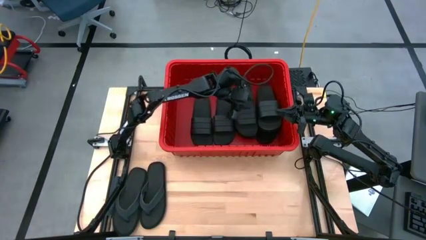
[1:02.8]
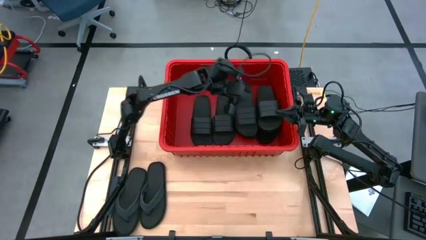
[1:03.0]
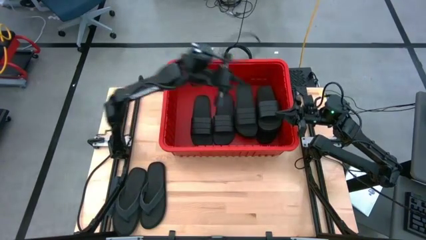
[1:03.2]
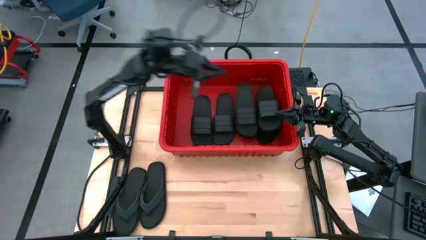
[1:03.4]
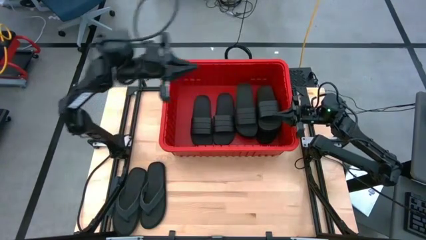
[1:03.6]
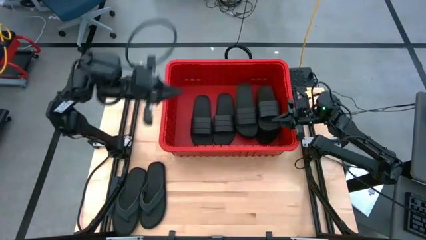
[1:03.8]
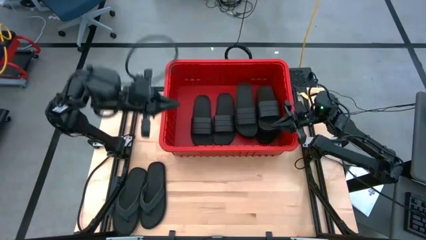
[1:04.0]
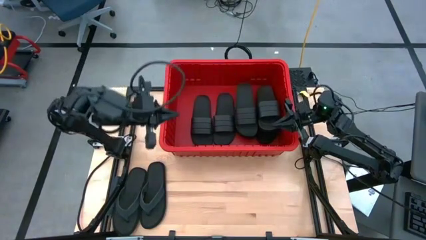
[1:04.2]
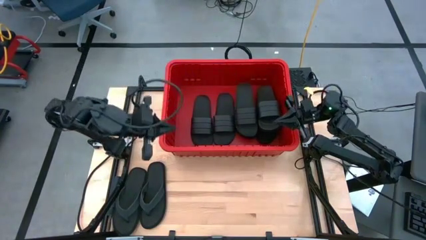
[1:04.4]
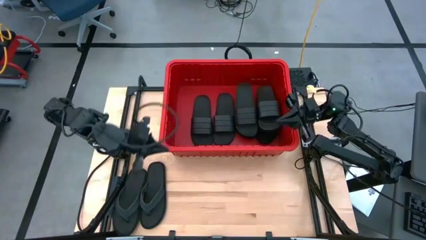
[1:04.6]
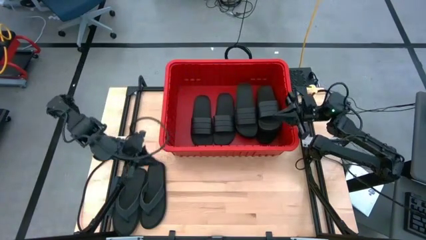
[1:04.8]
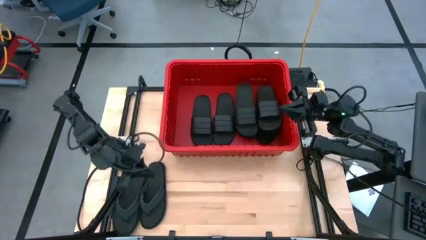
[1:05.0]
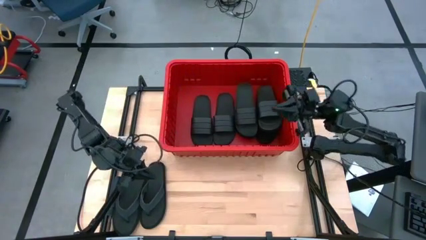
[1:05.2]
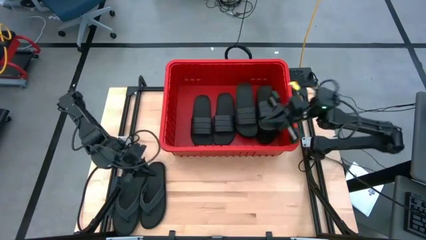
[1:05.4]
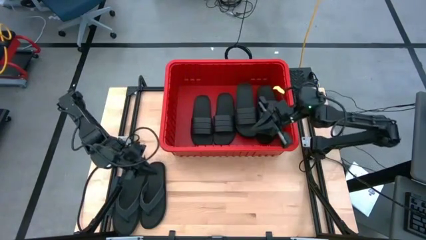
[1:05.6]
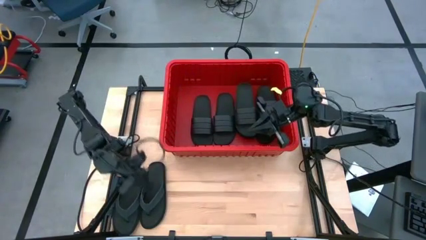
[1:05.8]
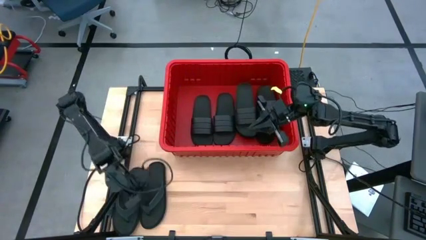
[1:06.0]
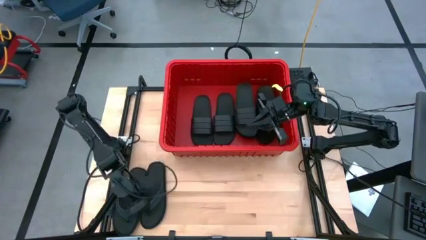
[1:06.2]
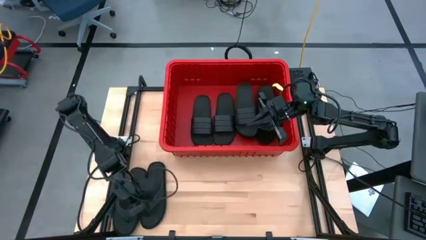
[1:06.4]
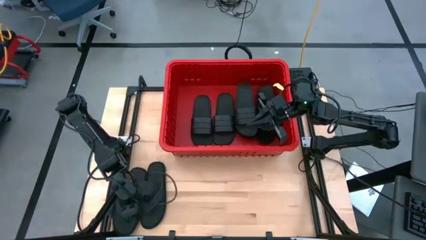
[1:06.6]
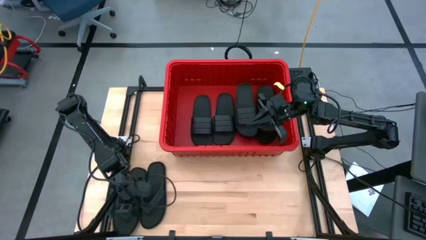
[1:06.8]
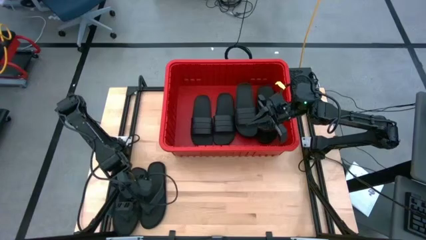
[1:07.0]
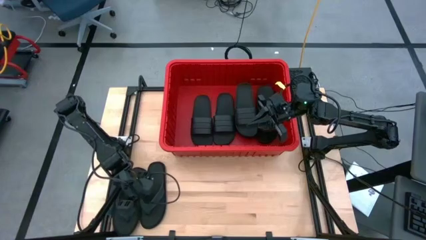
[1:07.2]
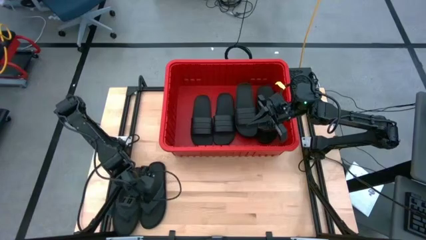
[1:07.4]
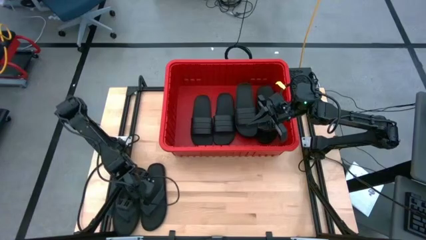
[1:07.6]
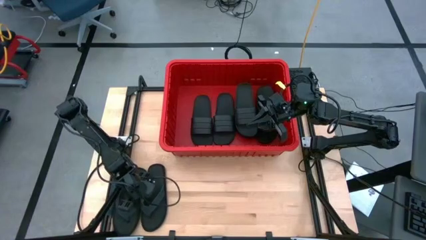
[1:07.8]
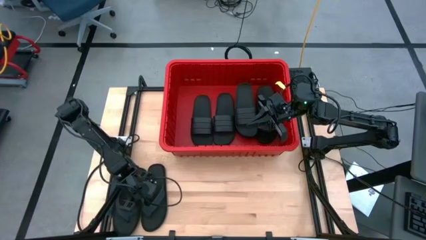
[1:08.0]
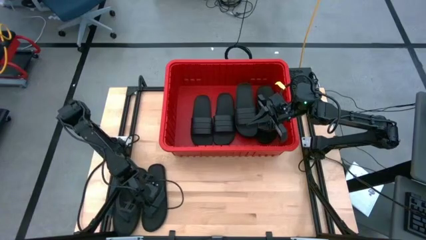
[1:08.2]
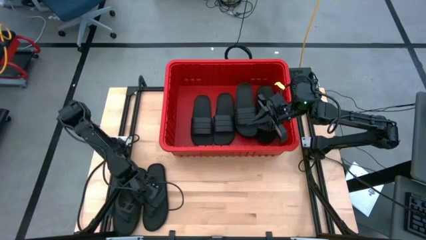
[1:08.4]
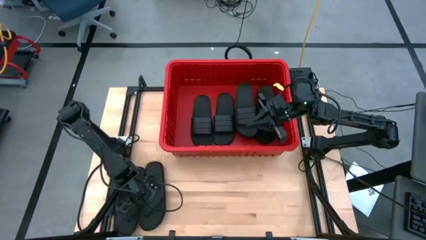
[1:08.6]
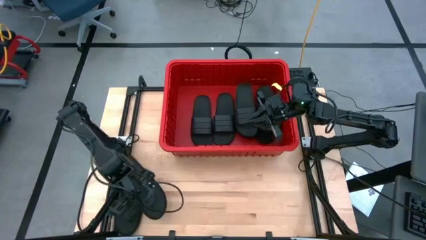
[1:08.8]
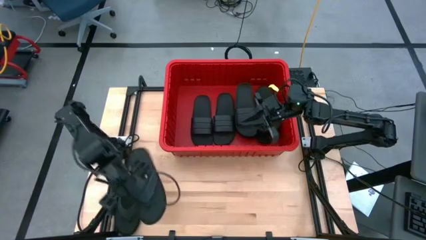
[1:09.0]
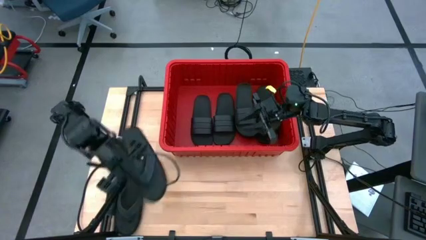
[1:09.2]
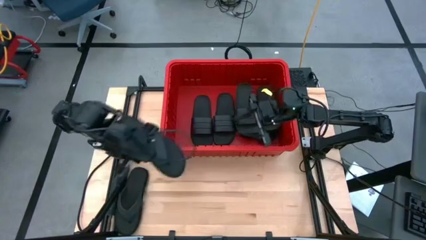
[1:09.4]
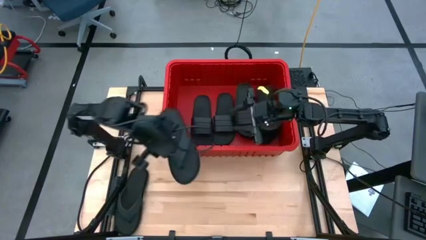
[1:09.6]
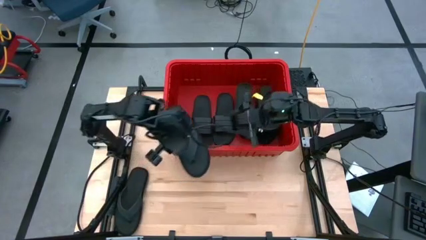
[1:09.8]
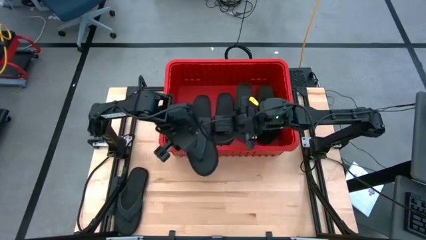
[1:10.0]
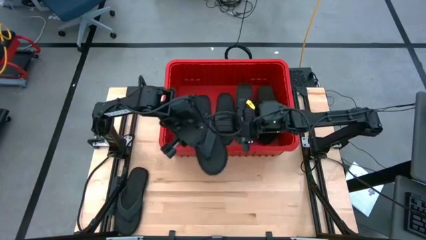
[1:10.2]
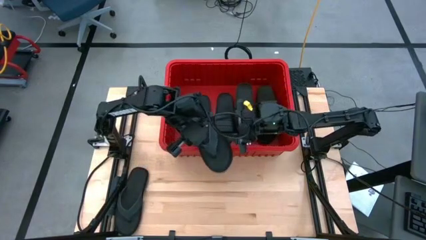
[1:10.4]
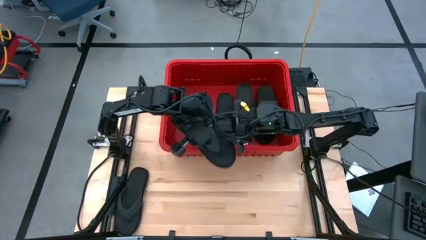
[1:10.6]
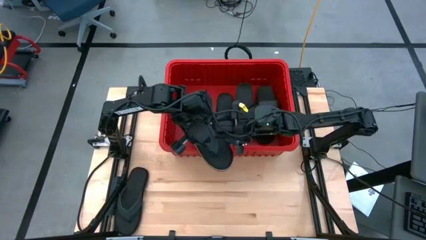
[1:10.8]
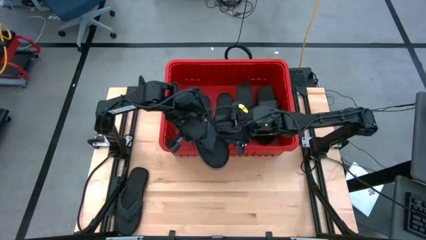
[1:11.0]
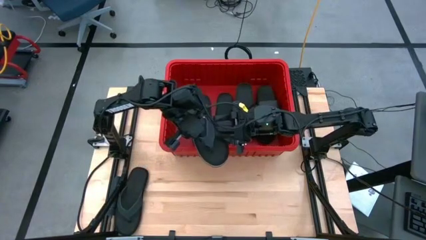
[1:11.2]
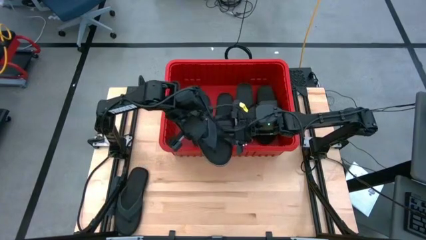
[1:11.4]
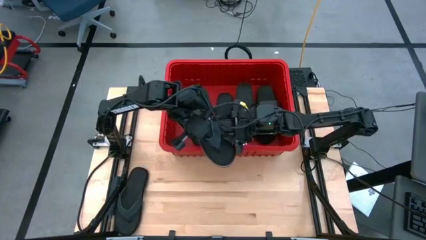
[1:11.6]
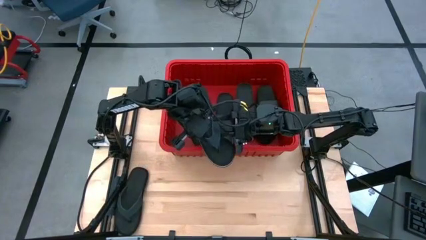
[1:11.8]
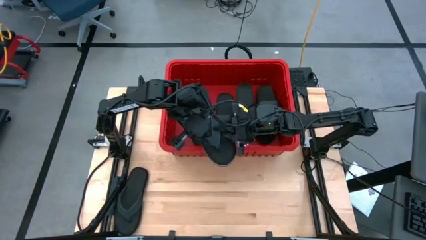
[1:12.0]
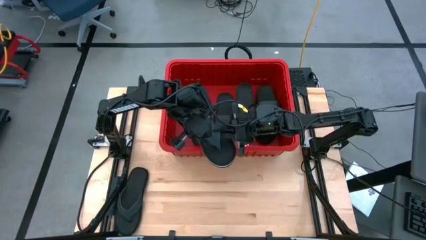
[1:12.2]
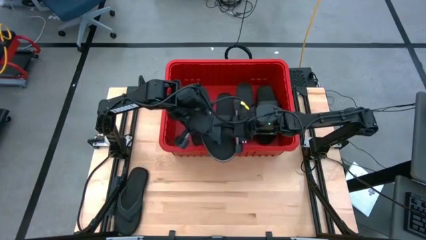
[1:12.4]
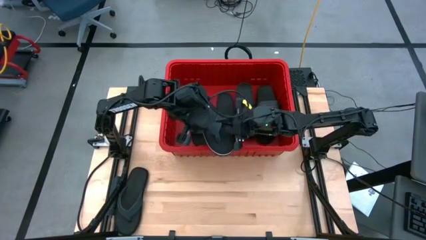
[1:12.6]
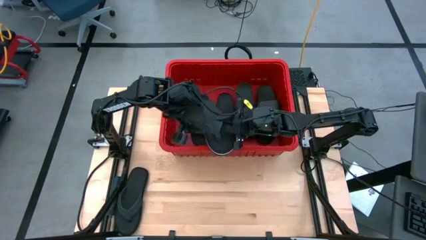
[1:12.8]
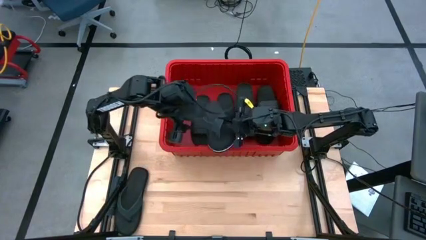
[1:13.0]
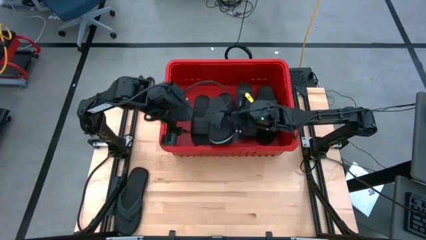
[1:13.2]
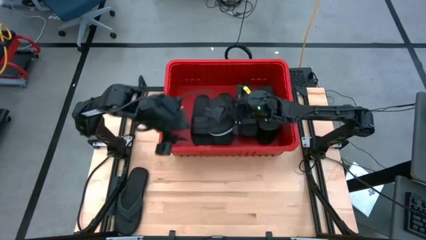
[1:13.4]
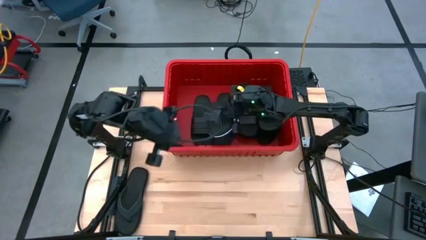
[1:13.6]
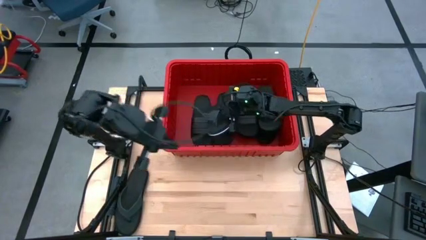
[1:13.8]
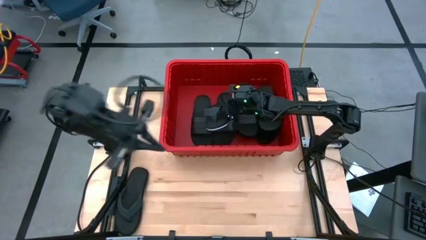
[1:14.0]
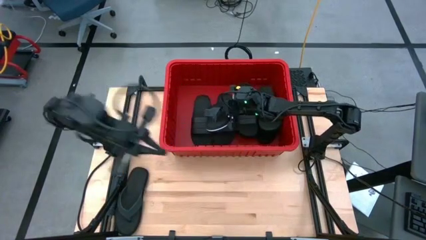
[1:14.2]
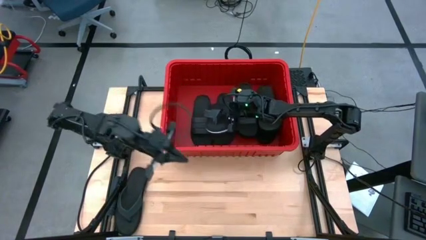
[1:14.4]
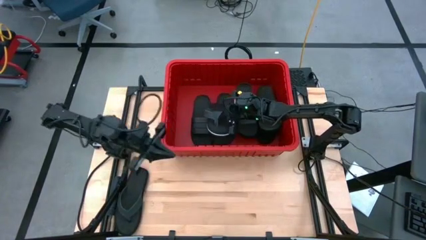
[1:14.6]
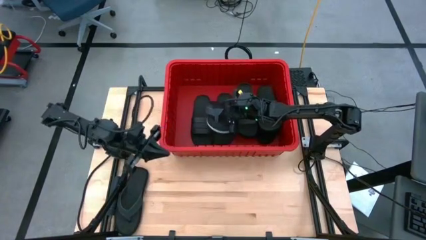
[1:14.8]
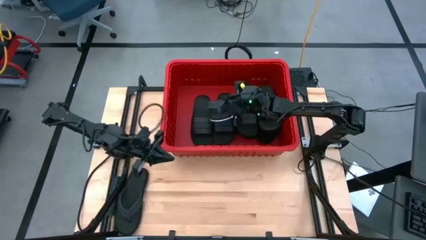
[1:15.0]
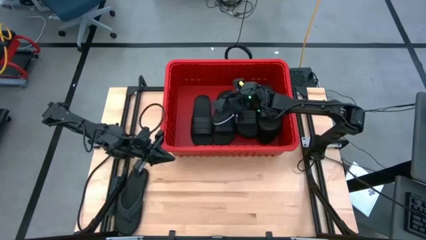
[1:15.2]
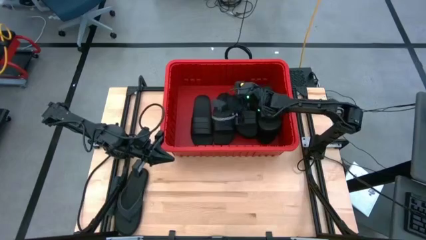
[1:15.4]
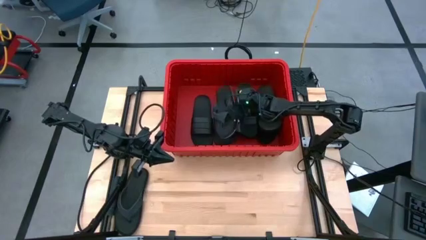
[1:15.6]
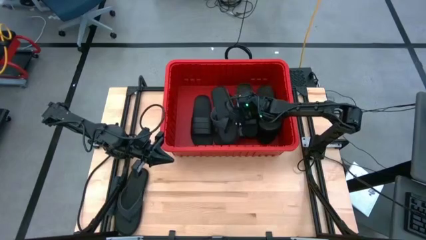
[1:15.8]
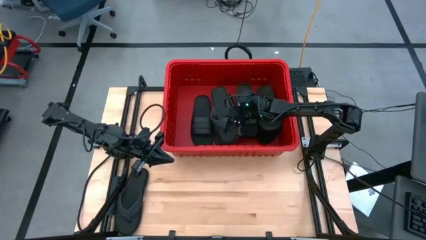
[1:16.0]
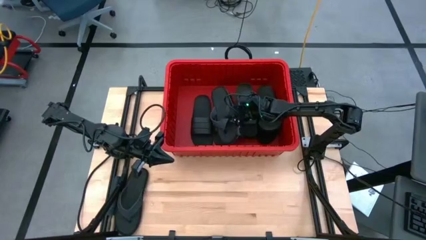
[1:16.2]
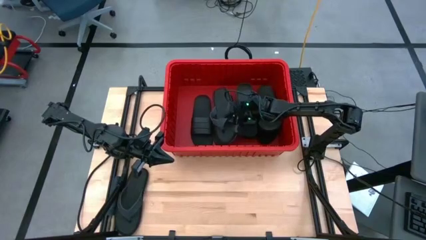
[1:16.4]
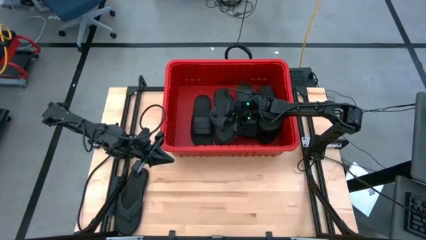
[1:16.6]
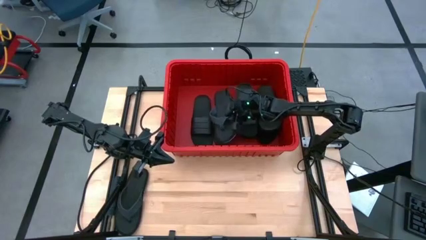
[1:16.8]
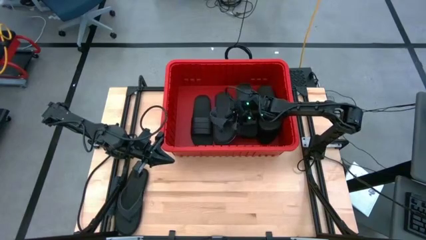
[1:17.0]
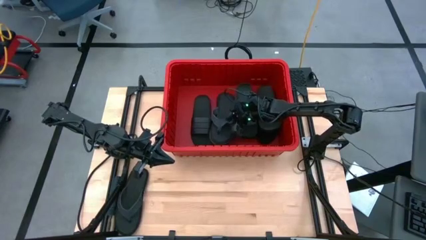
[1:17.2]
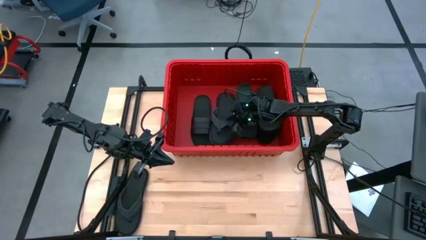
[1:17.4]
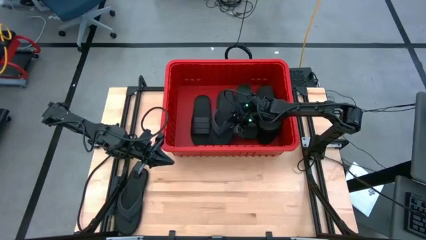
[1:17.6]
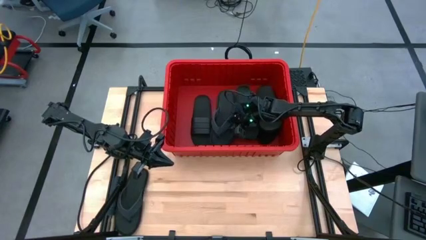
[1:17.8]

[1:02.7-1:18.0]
Task: Pick and place slides into bin
Put the black slipper into the red container

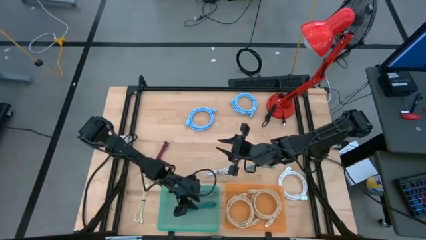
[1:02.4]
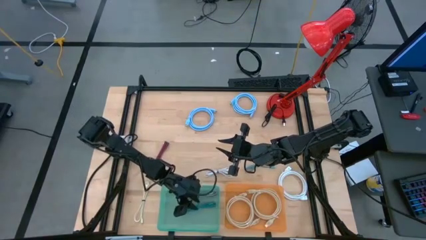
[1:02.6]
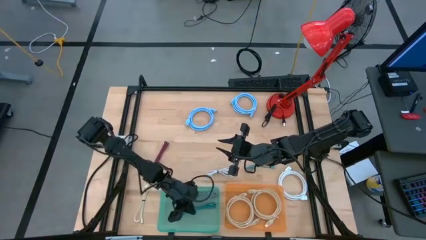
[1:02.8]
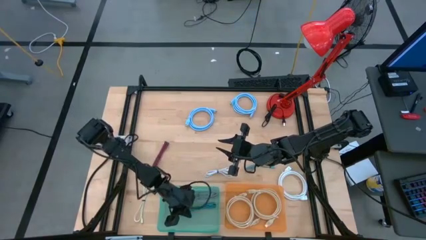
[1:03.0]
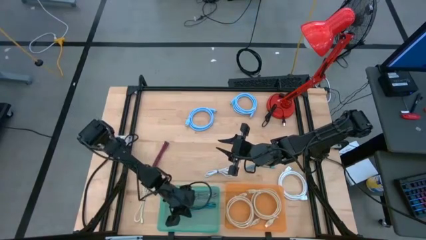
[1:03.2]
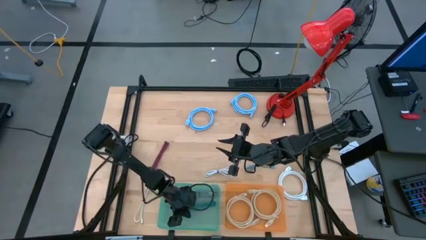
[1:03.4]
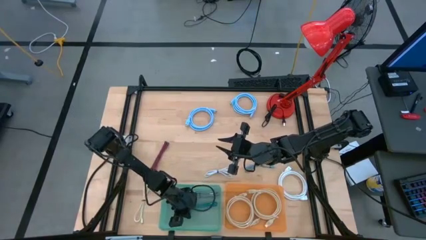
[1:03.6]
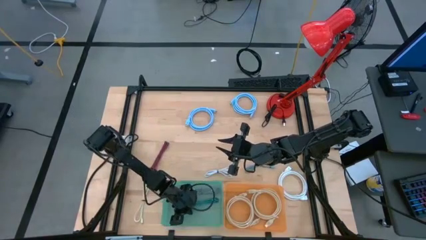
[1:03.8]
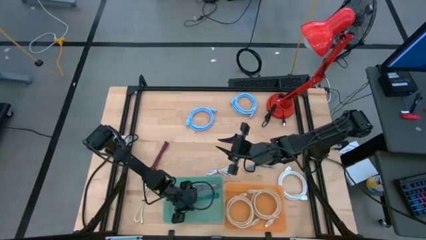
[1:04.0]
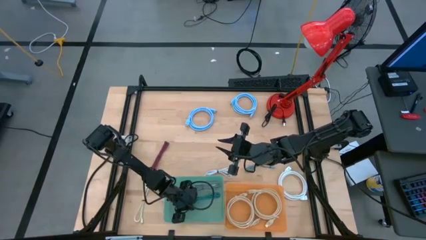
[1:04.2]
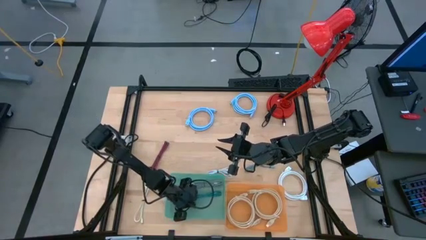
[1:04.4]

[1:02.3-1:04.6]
Task: Pick & Place USB Port
Adjust the green bin
